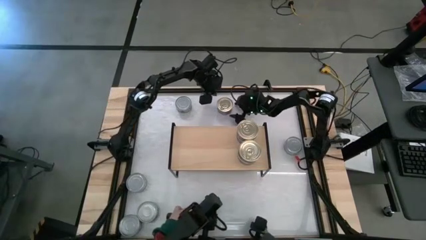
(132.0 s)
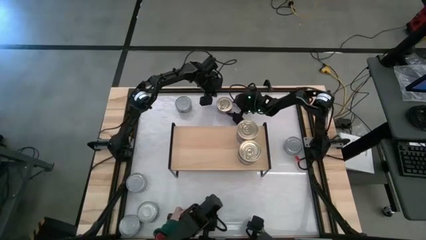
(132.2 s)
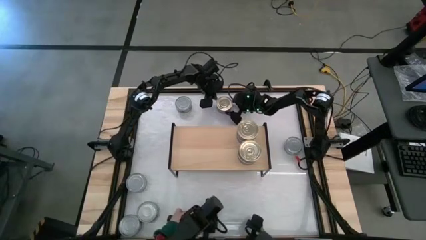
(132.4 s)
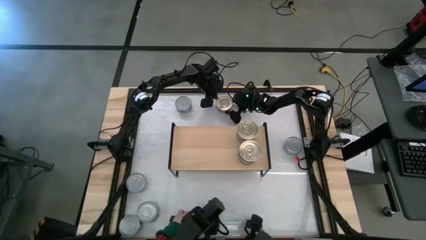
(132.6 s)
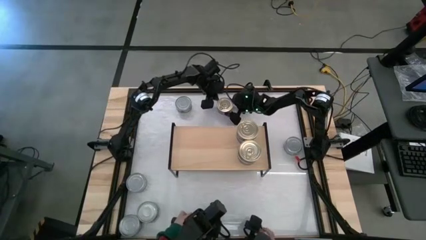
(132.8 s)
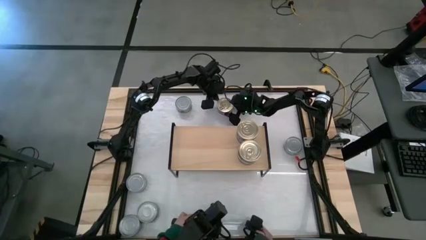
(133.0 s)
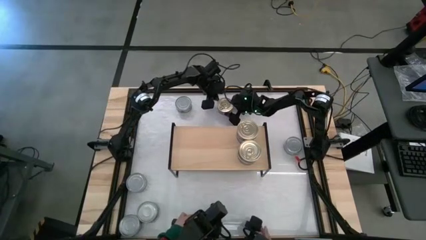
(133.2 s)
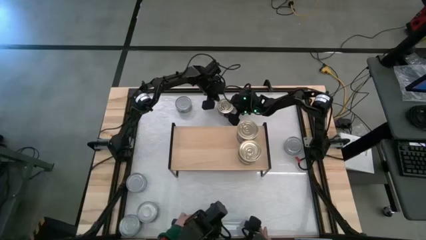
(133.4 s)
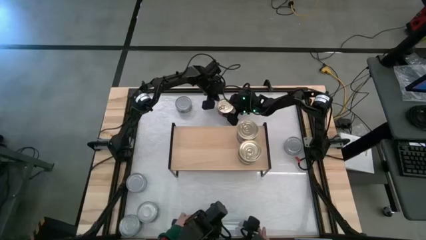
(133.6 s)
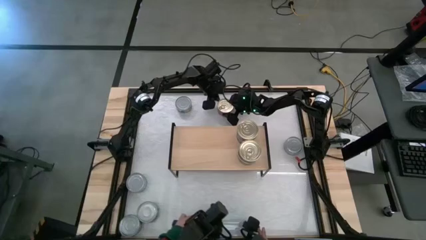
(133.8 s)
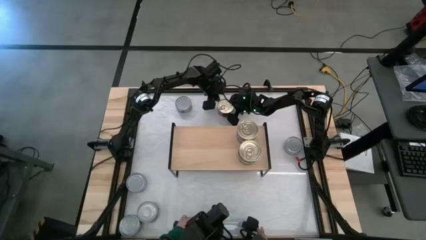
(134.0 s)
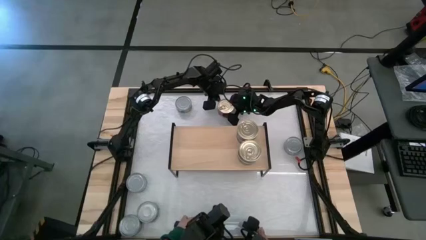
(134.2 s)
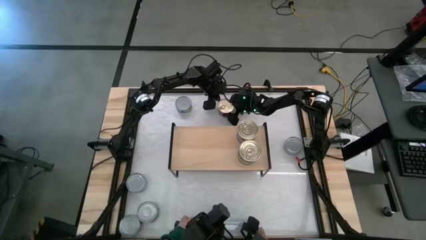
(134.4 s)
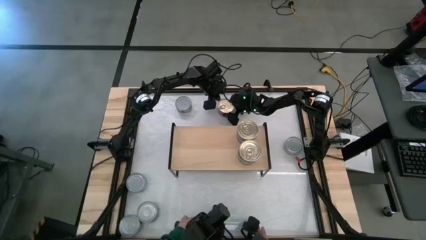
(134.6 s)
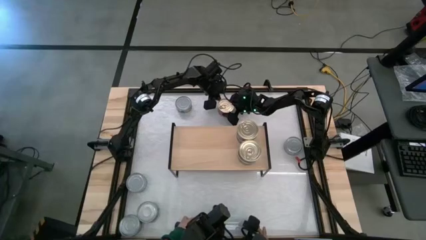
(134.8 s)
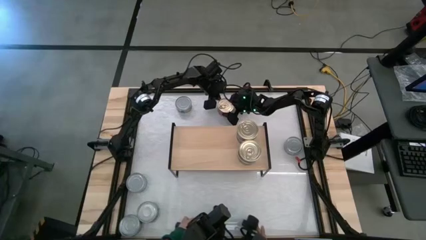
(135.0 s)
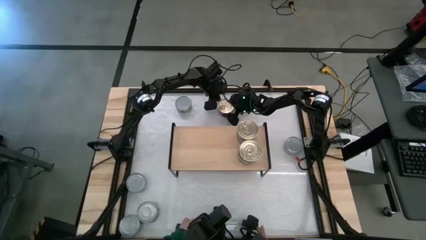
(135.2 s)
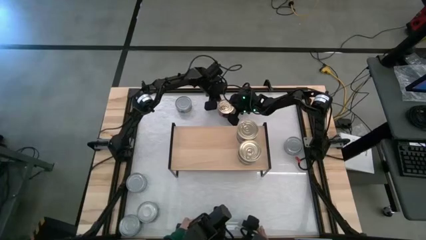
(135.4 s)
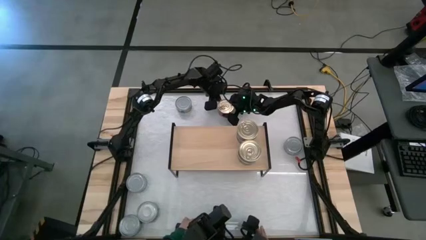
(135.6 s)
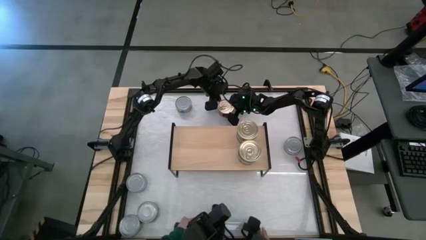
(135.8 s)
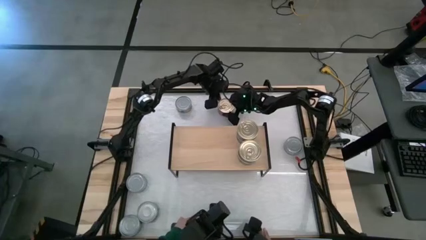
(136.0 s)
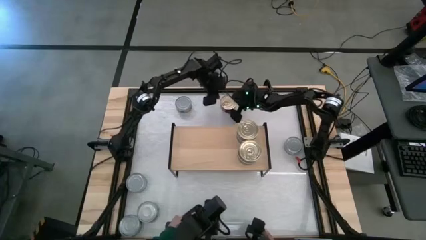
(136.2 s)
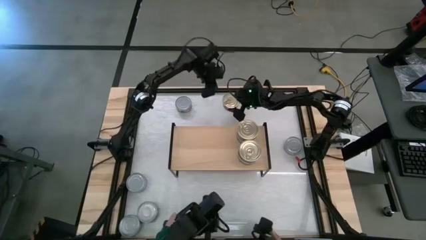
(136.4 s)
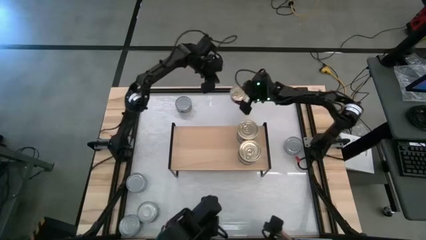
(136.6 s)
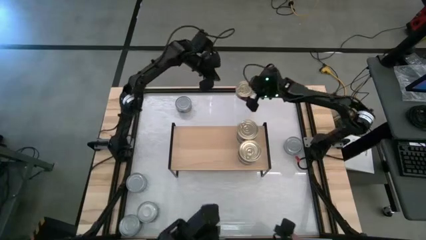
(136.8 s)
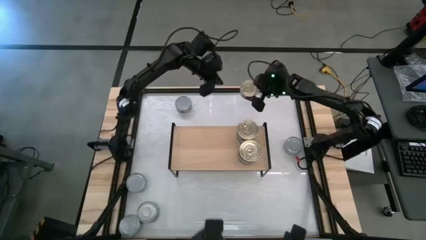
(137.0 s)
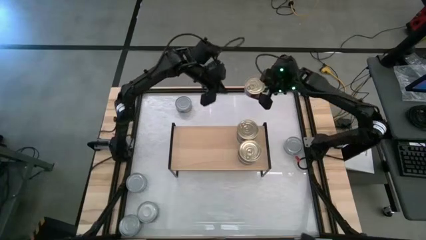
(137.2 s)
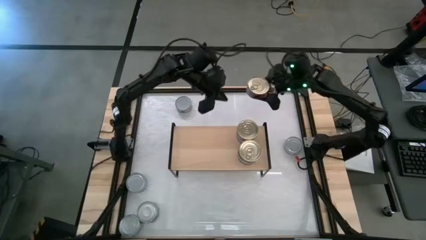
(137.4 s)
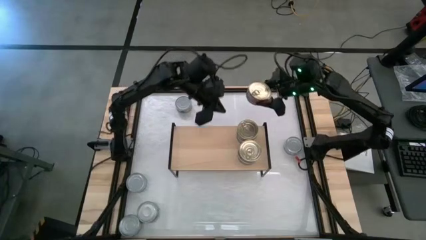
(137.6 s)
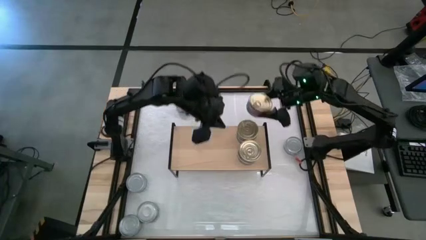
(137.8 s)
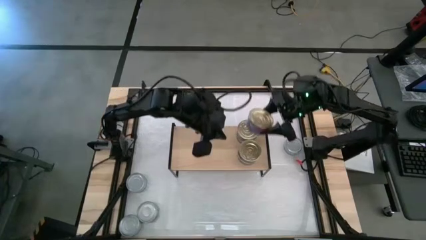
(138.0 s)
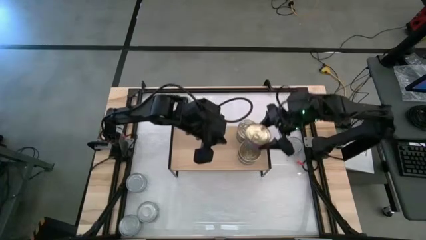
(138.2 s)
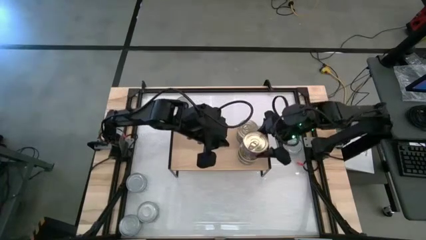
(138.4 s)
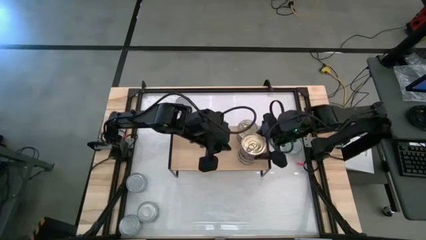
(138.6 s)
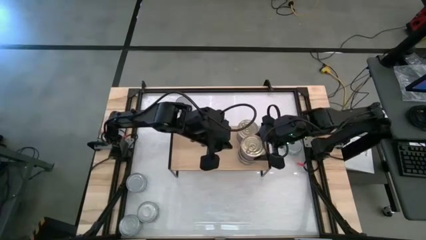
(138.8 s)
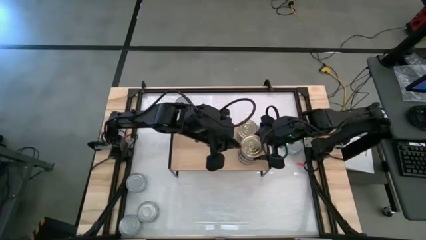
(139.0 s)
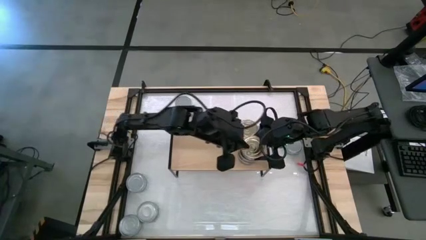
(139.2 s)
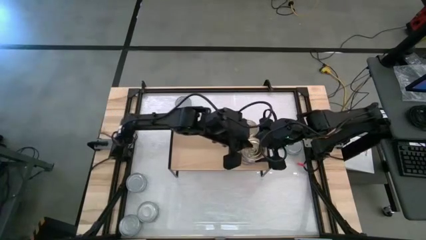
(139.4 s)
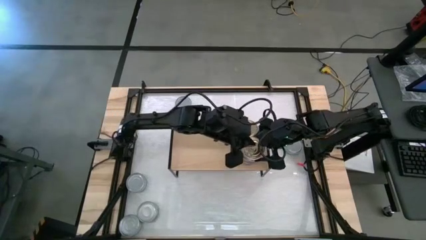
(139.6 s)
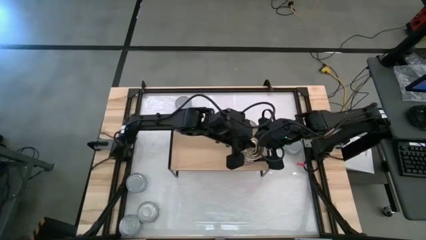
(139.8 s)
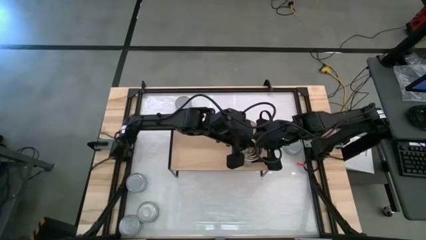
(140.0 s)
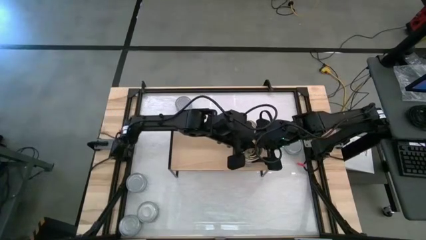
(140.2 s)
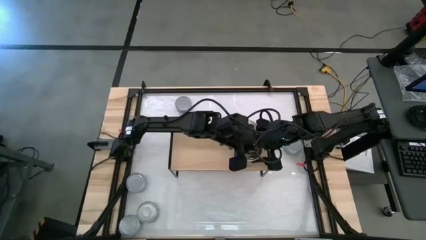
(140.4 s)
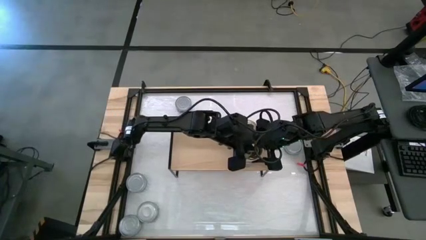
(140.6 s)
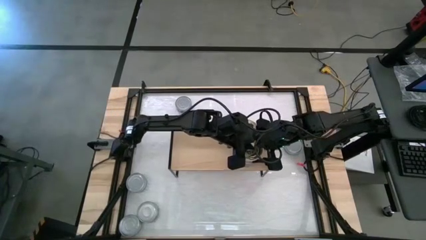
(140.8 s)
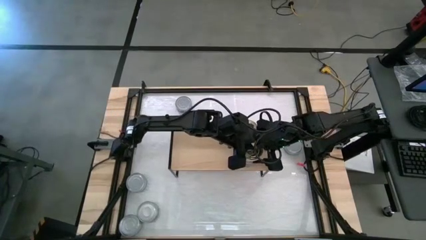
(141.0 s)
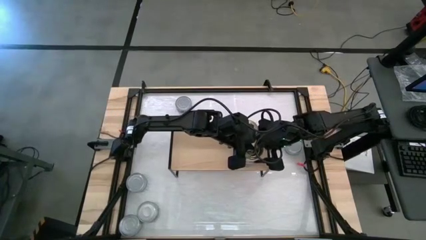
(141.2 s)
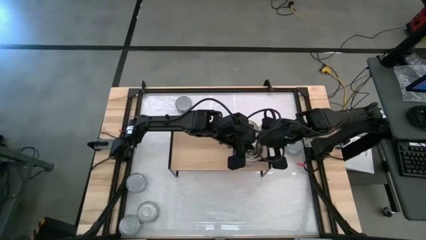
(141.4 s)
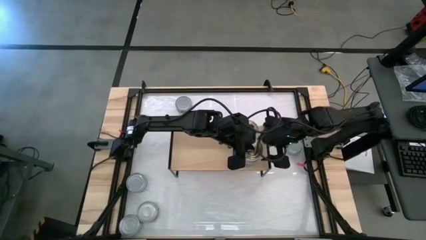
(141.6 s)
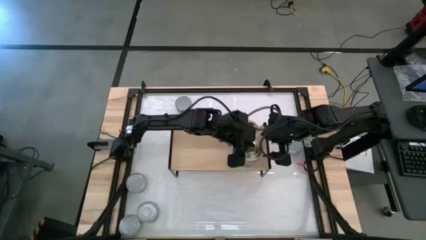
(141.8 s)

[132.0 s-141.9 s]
Task: Stack canned seafood by type on shelf
Stack the blue-pink tuna can on top of the other blue-pink tuna can on the shelf
